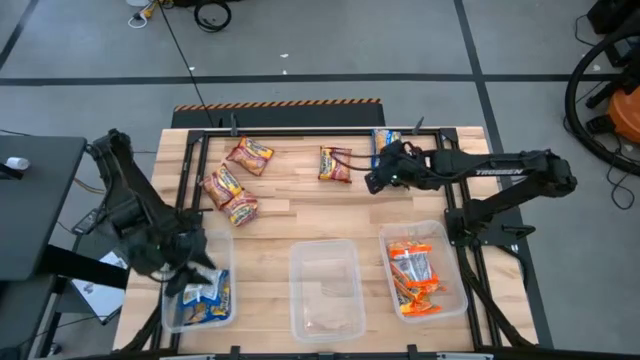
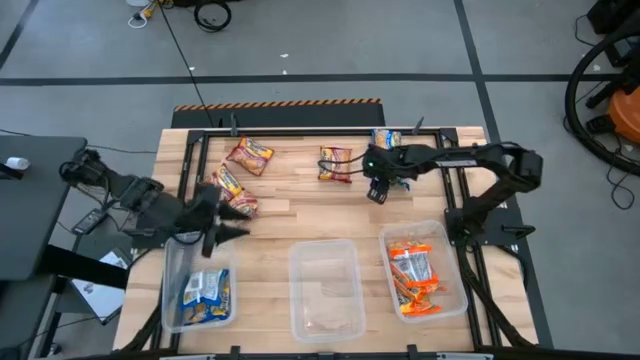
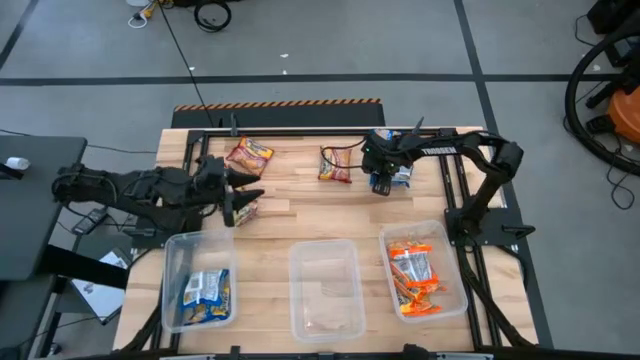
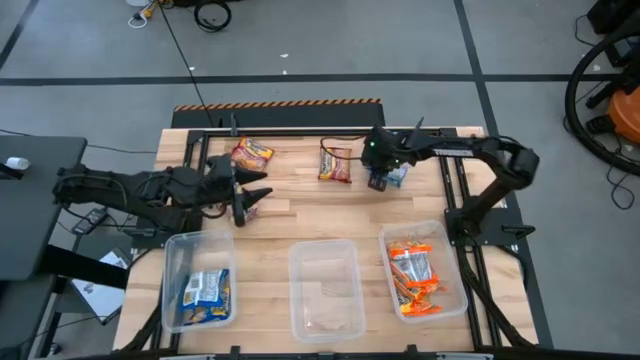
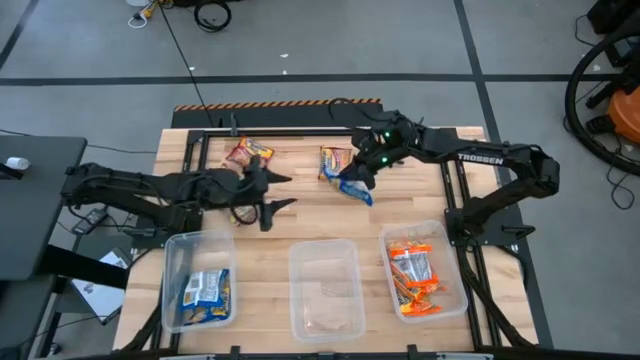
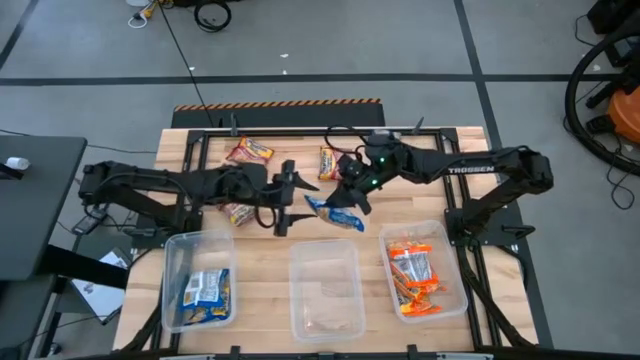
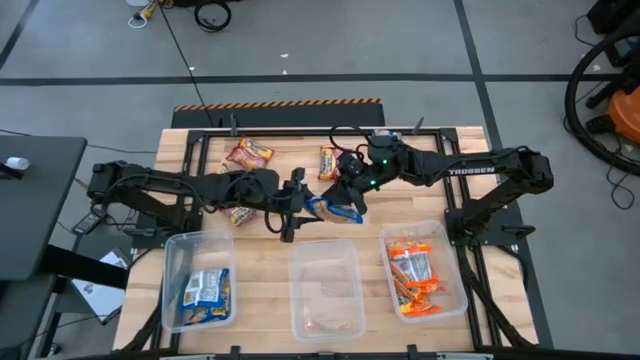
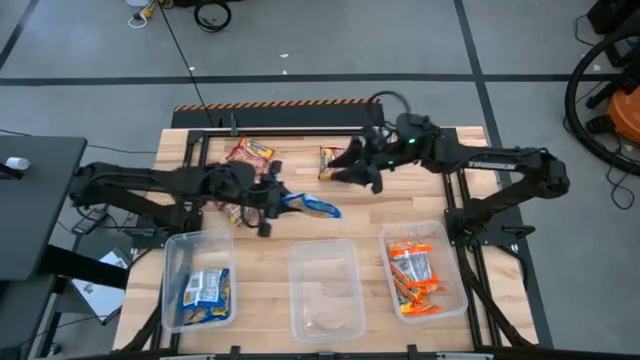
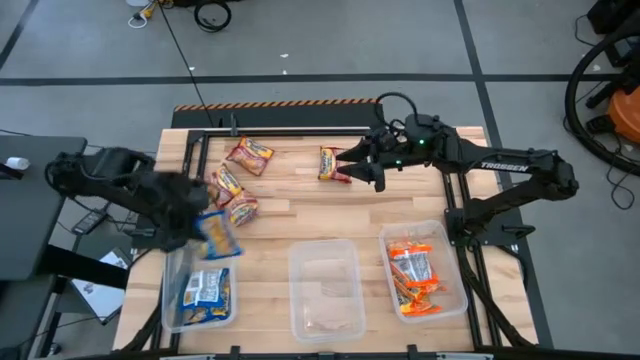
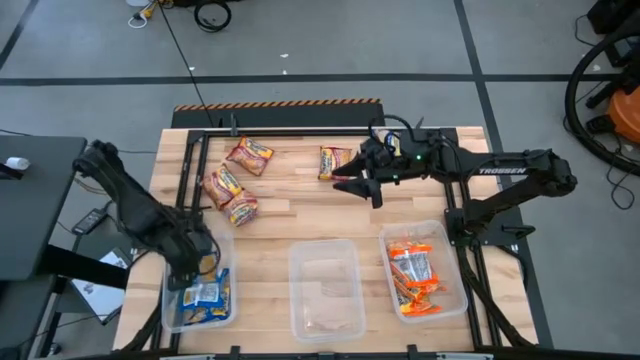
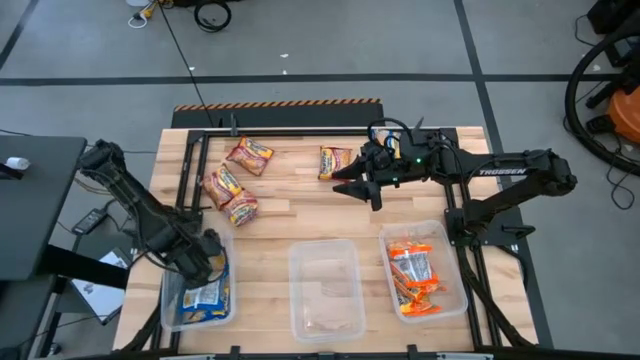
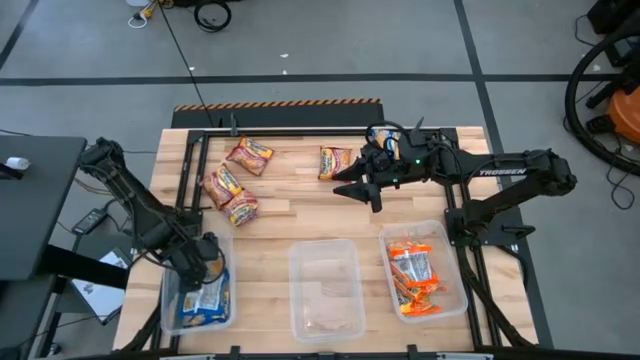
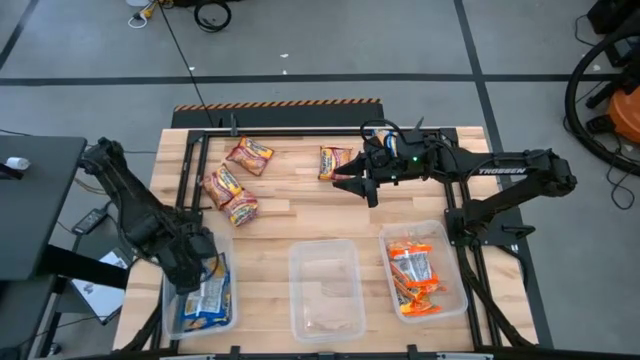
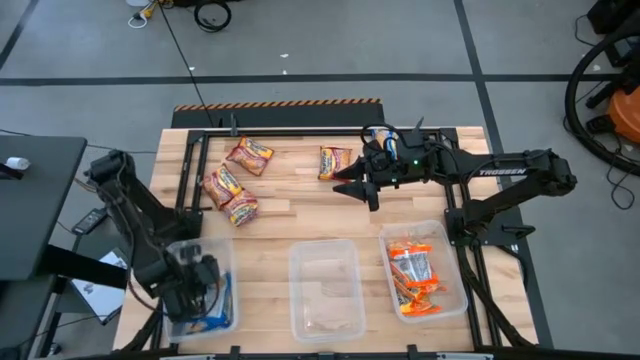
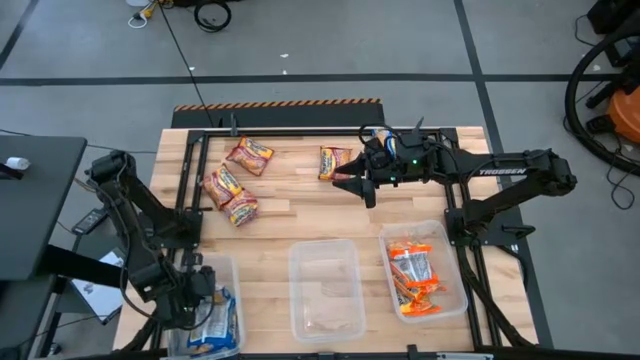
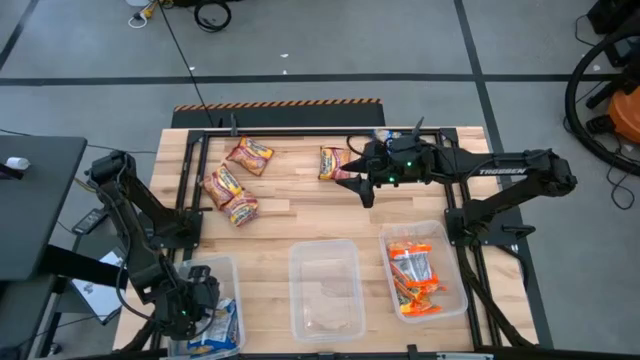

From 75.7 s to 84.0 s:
Task: Sort Maruchan noodles
Put the bottom blue noodle pack into the left transparent bin

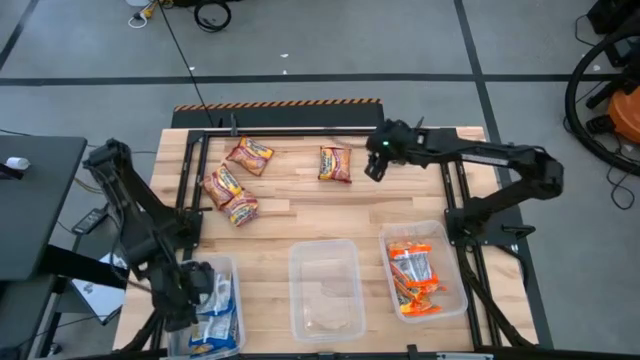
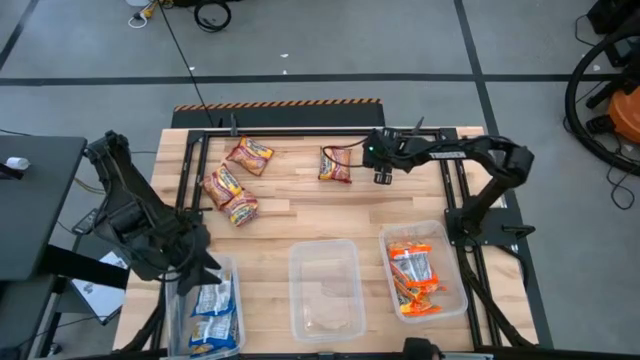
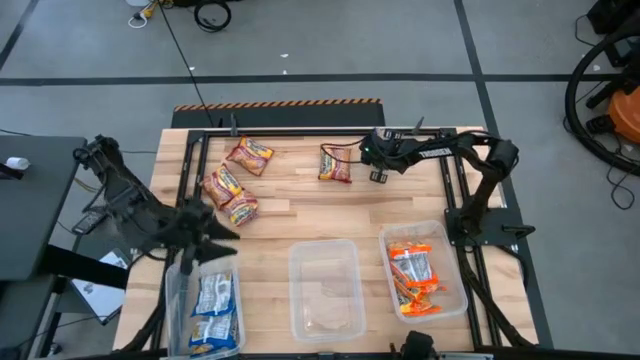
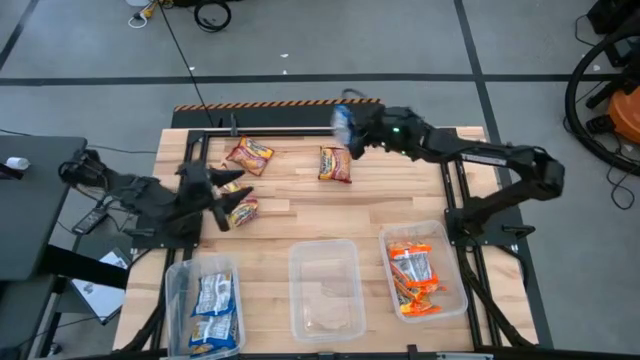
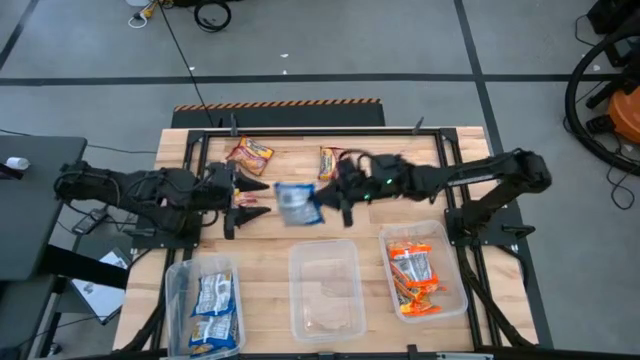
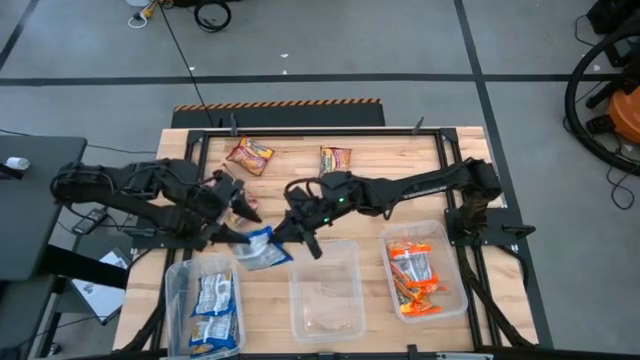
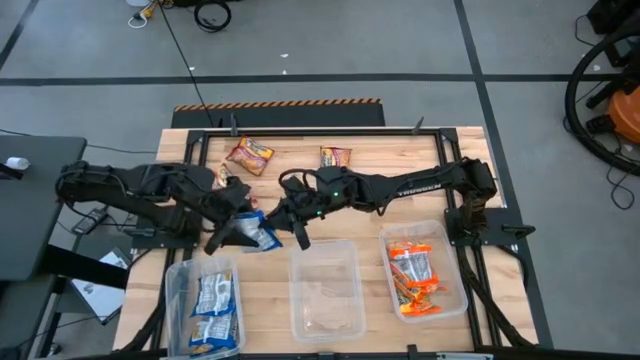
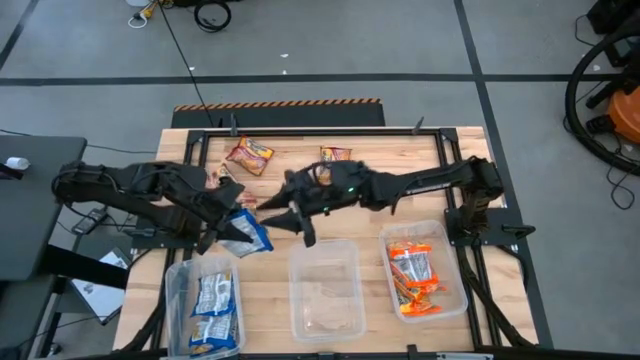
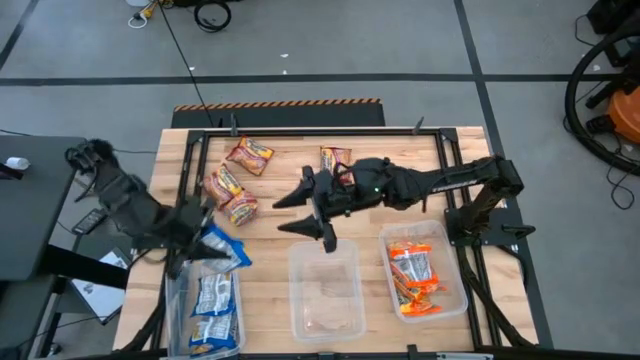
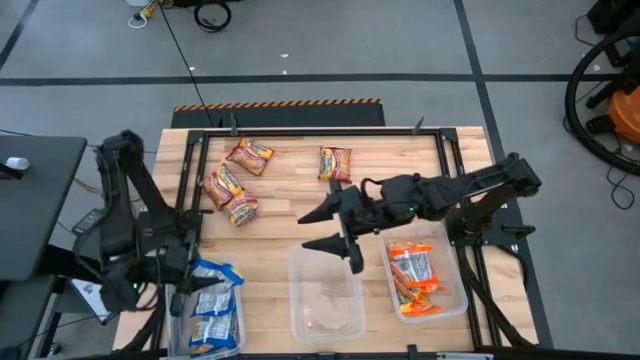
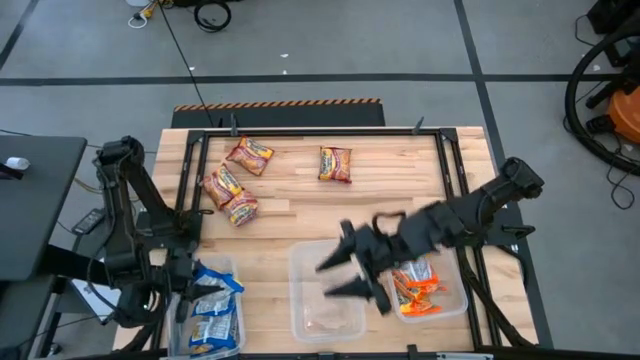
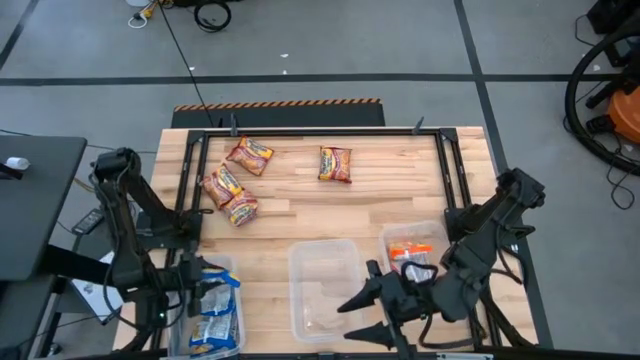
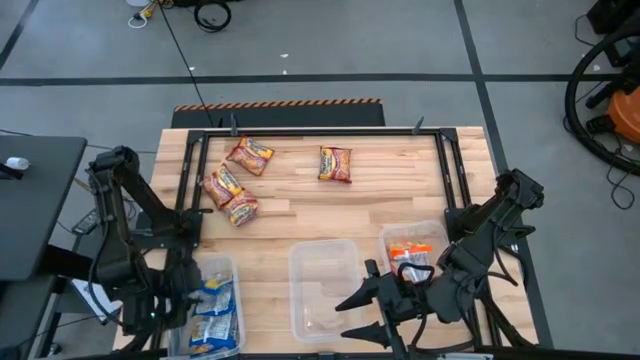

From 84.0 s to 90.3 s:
Put the blue noodle pack into the left transparent bin

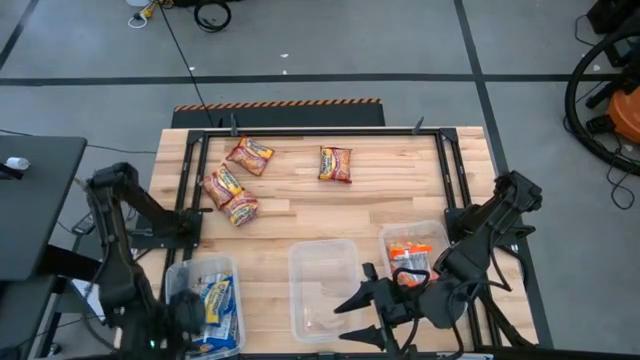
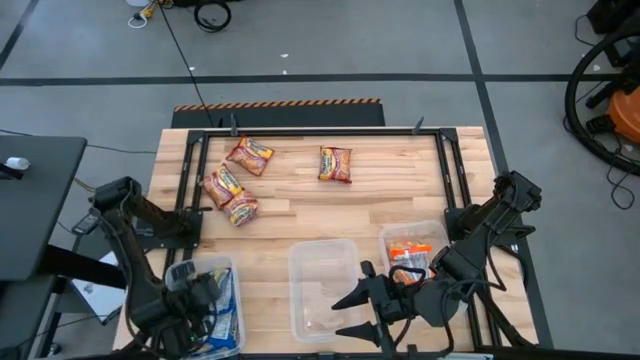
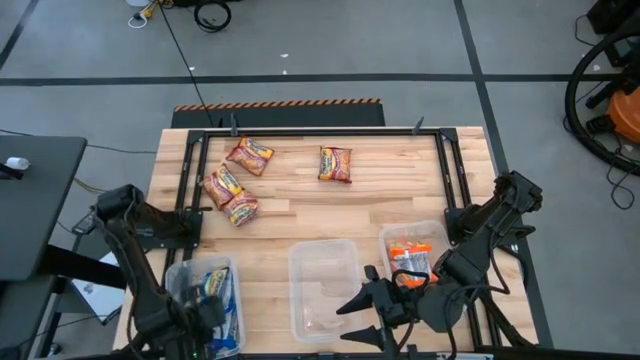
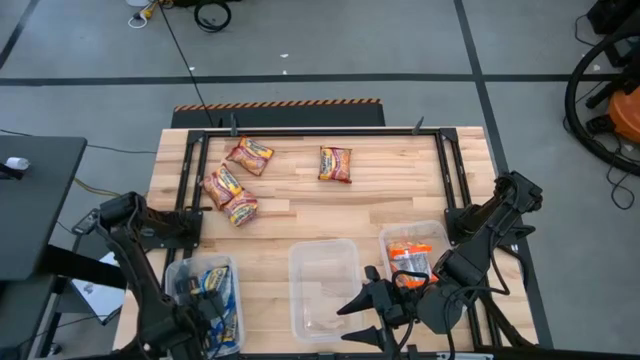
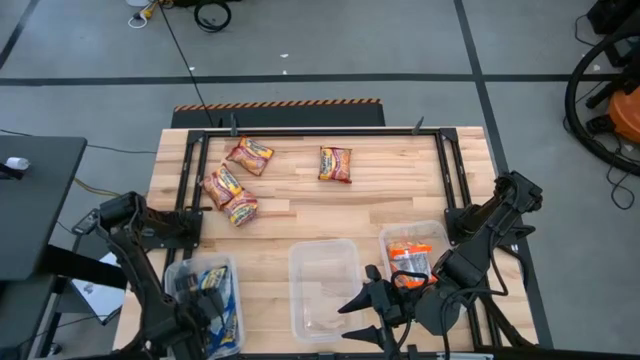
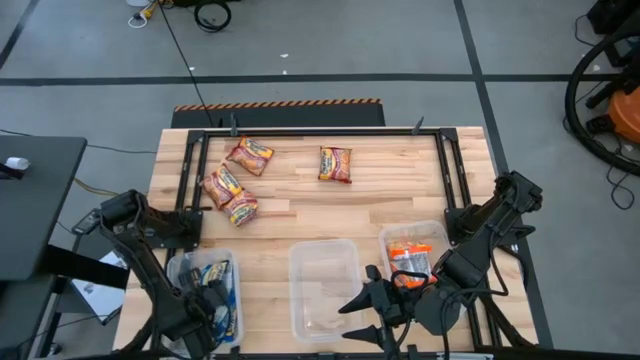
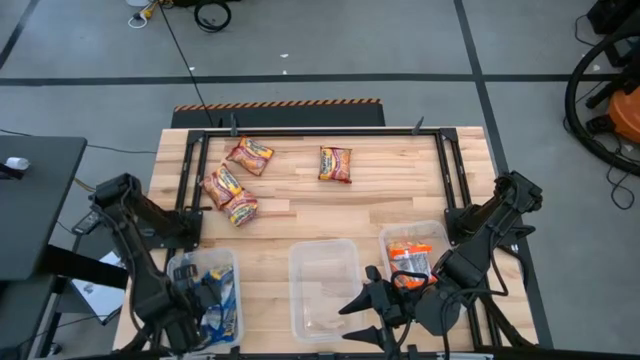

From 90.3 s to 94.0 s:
Adjust the blue noodle pack into the middle transparent bin

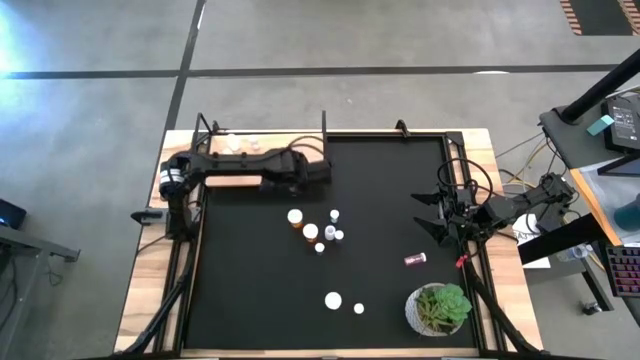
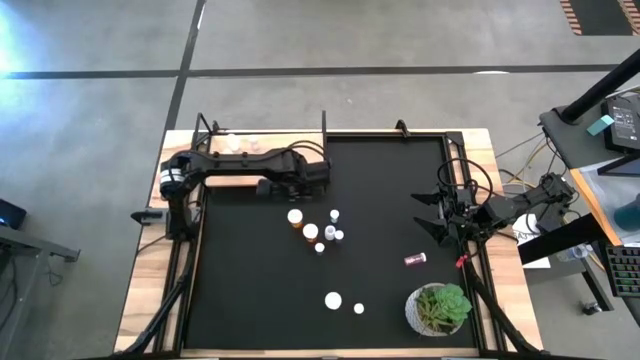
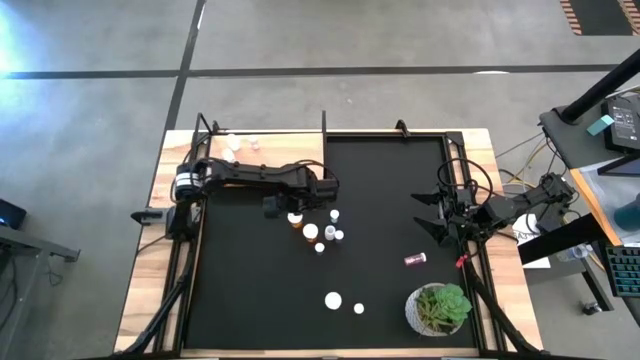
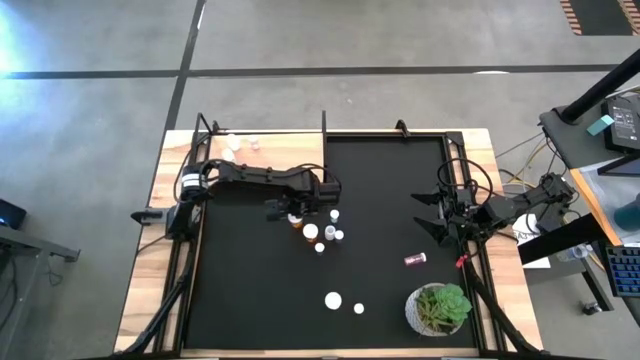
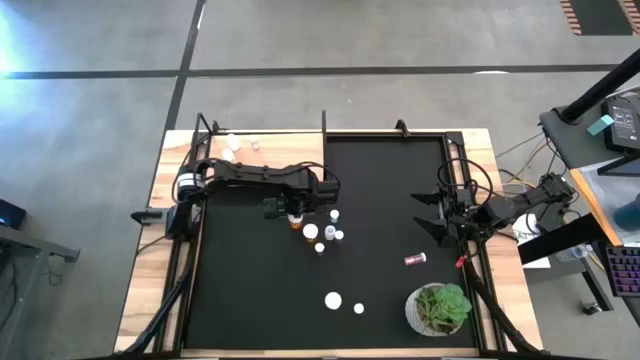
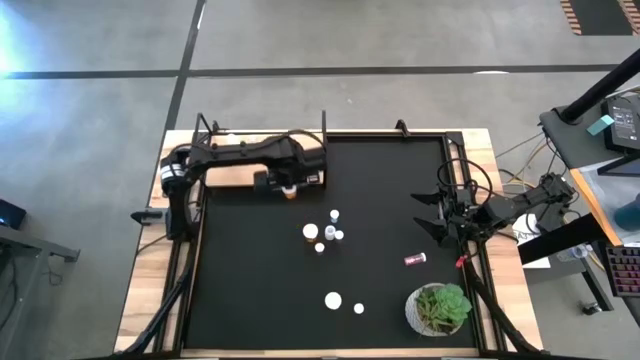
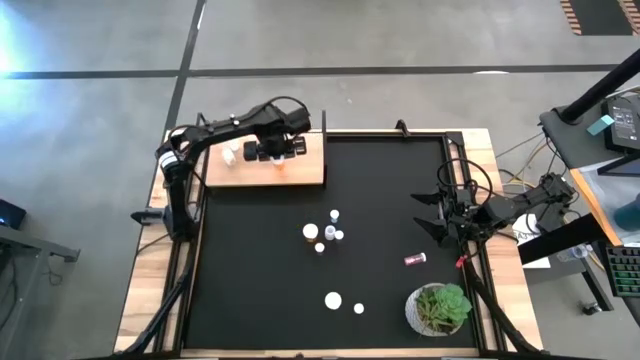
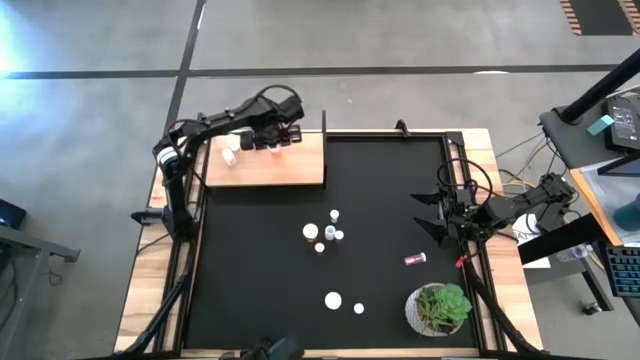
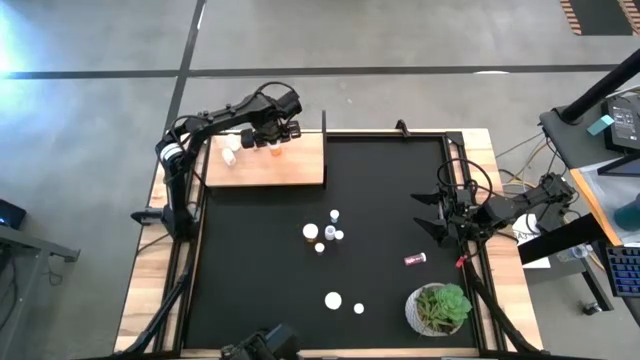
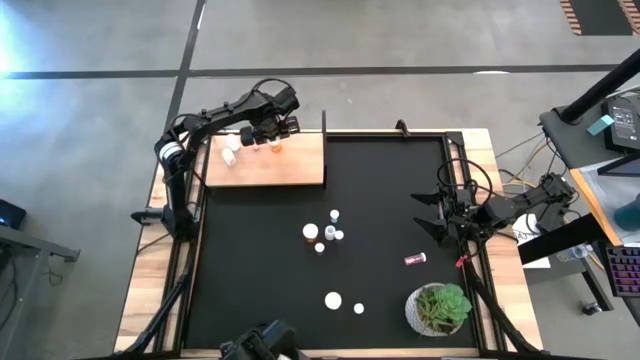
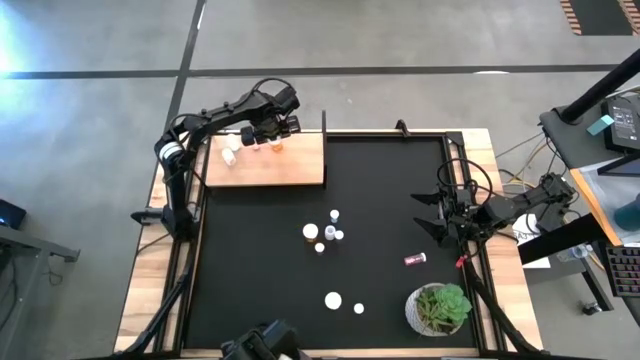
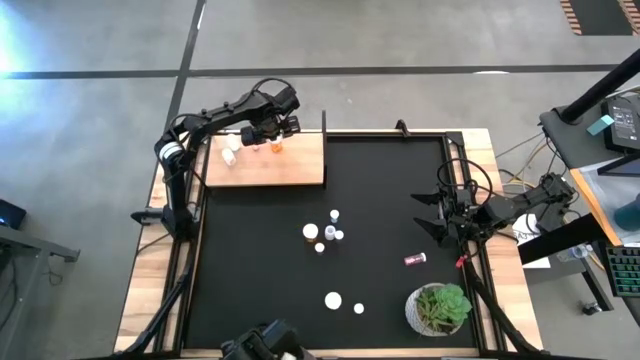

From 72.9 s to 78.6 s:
Task: Pick and place medicine bottles onto shelf by color
Put the top orange pill bottle on the shelf
